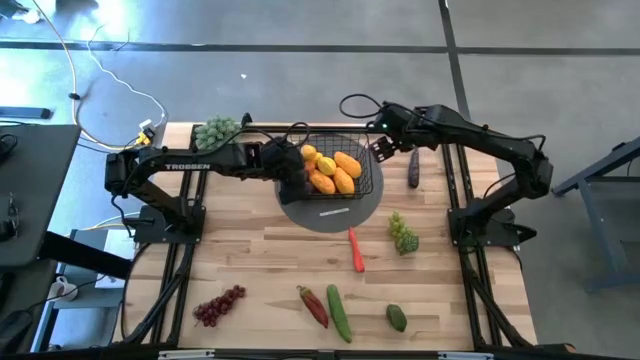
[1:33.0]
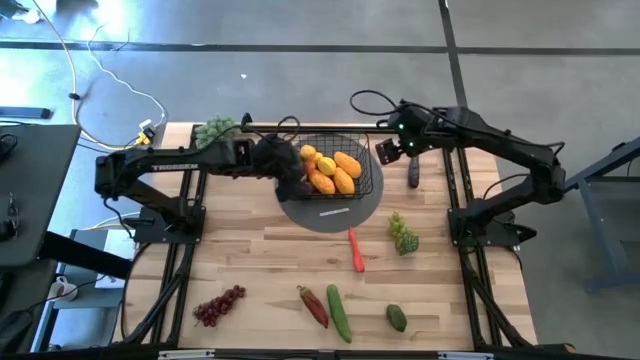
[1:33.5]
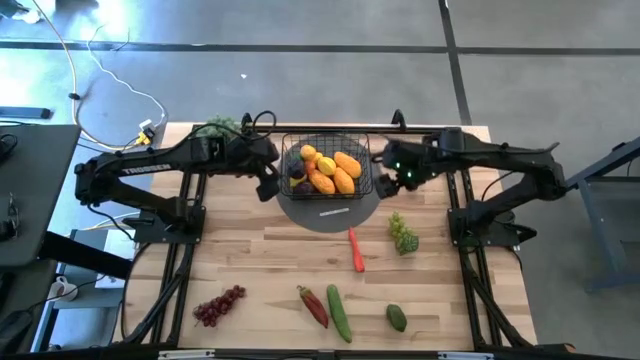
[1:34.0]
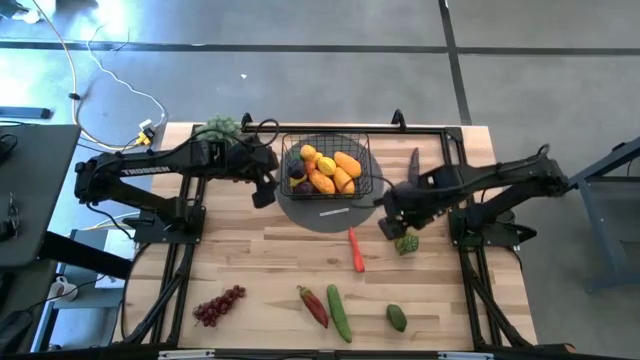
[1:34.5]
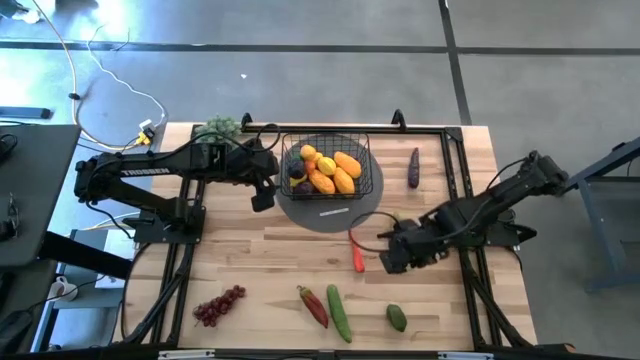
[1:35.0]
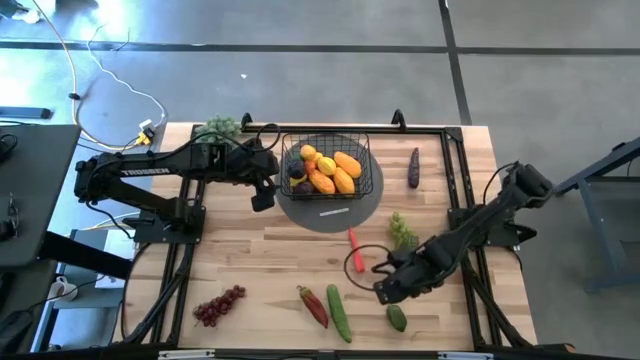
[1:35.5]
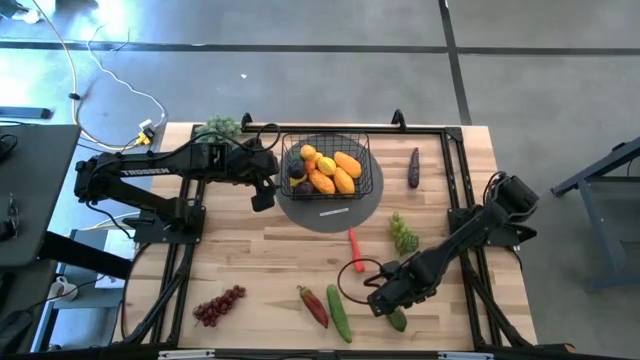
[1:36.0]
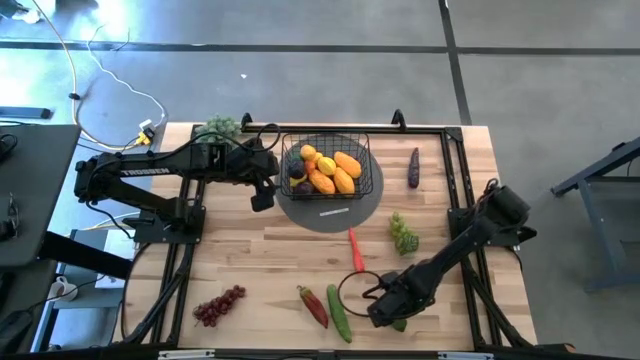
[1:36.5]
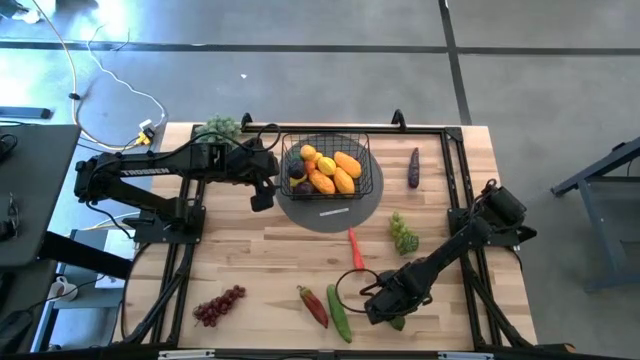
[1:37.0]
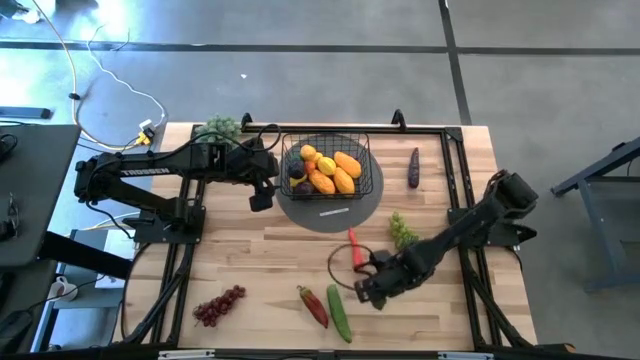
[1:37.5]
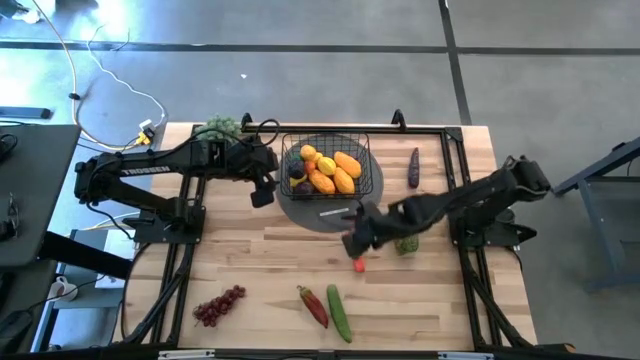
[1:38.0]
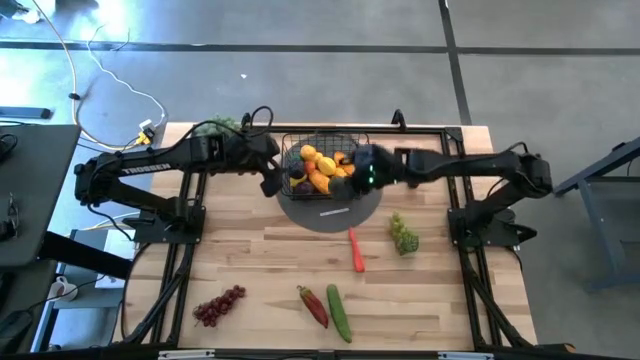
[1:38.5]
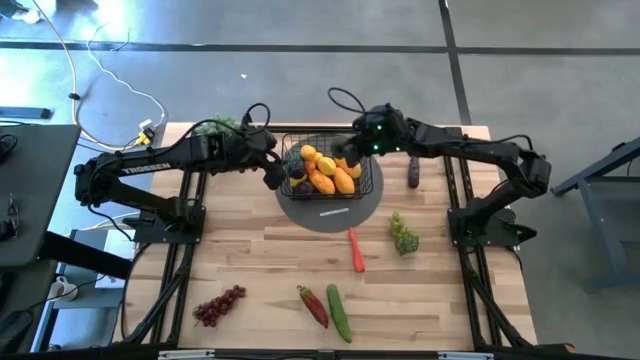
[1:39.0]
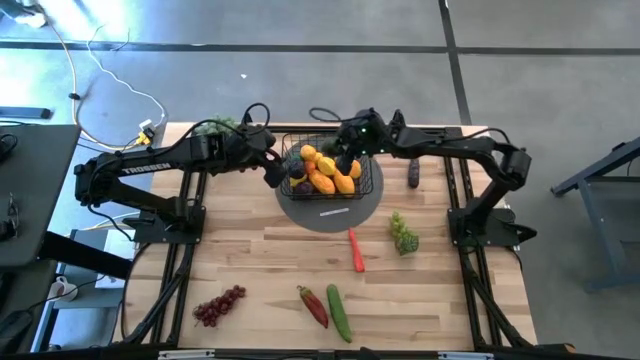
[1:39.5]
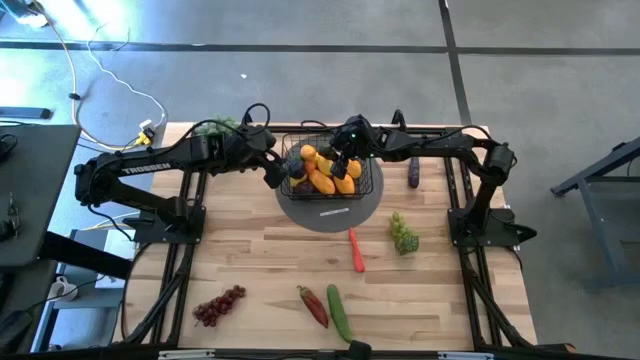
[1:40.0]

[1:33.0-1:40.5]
Task: Build produce basket
Put the lime into the black wire basket

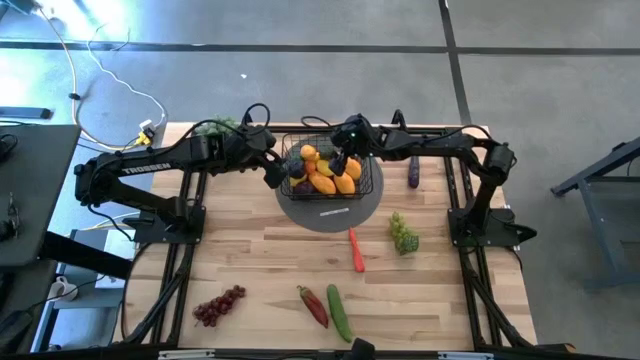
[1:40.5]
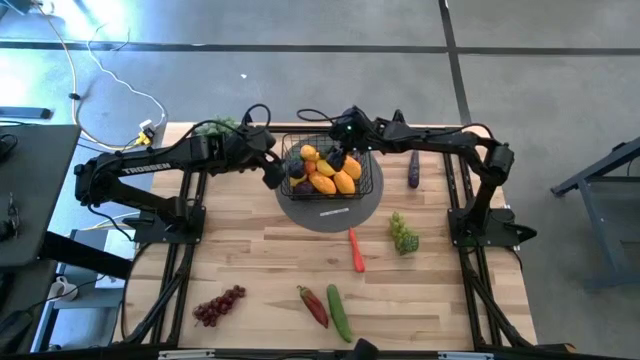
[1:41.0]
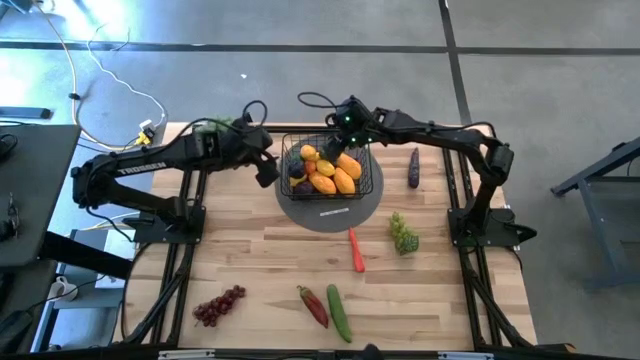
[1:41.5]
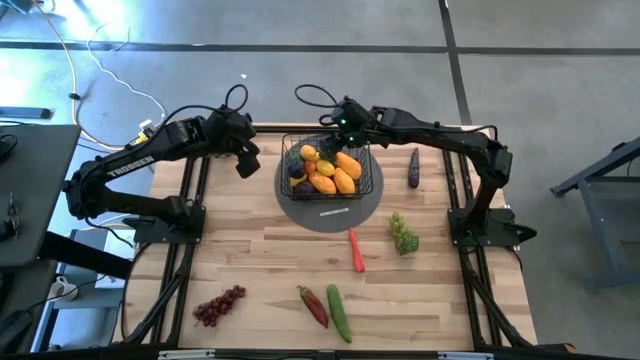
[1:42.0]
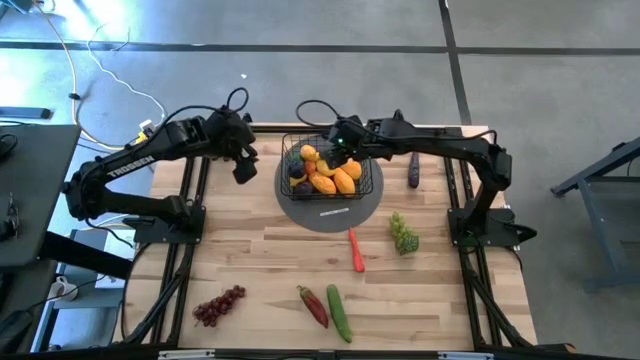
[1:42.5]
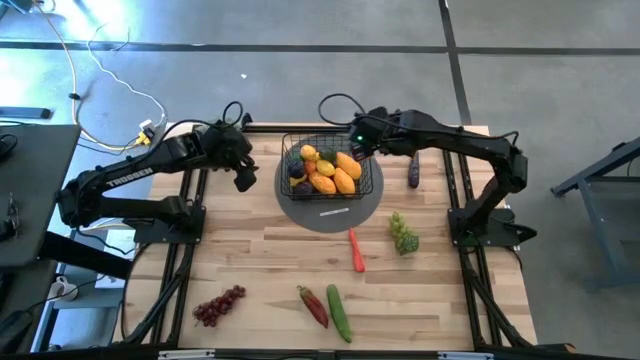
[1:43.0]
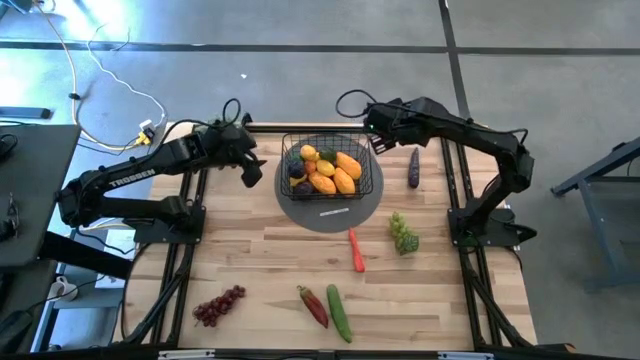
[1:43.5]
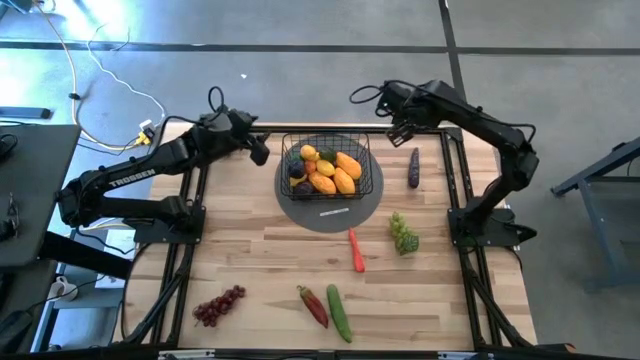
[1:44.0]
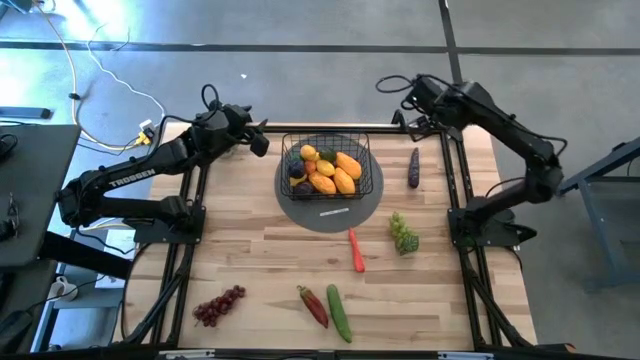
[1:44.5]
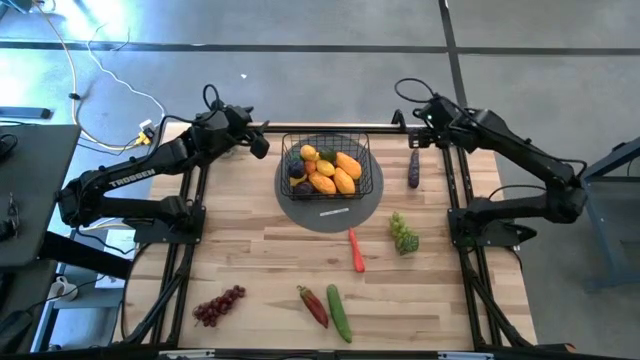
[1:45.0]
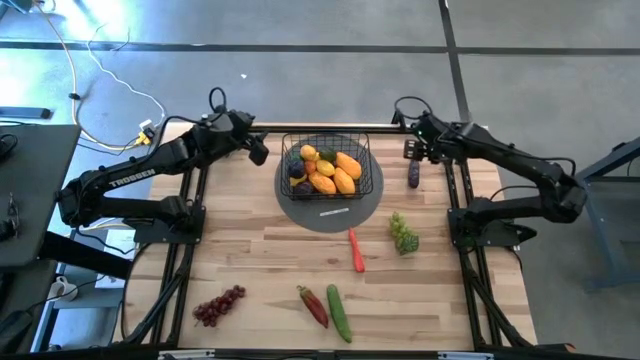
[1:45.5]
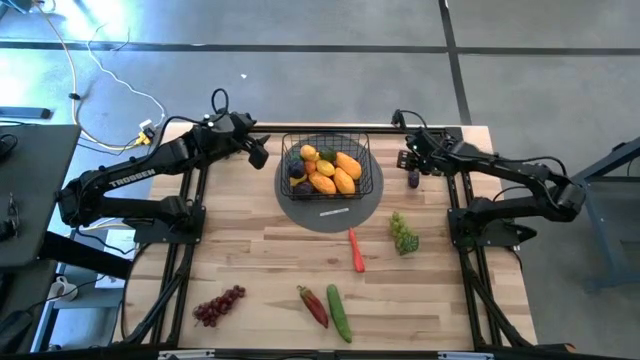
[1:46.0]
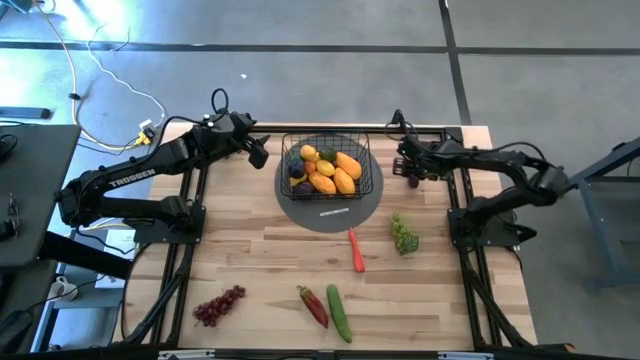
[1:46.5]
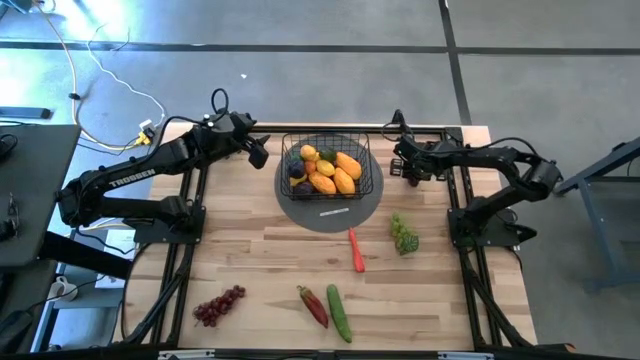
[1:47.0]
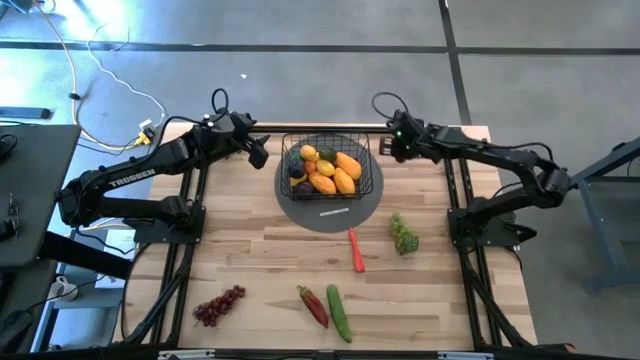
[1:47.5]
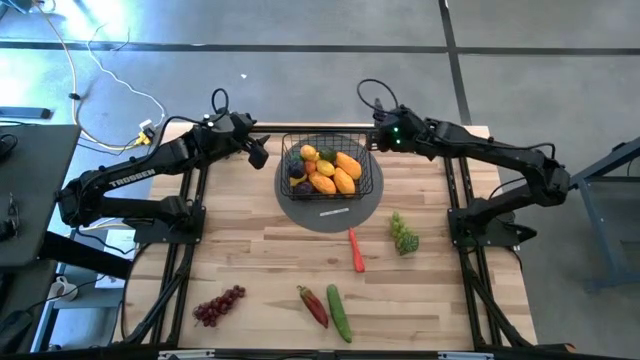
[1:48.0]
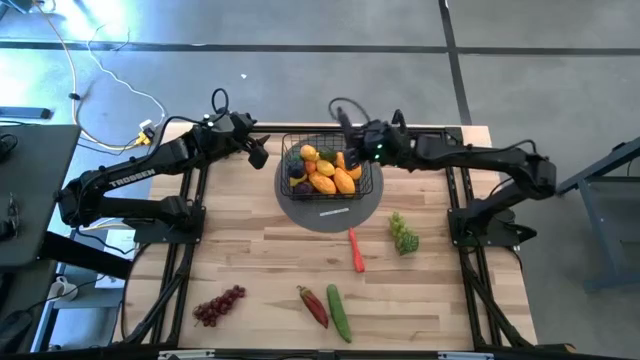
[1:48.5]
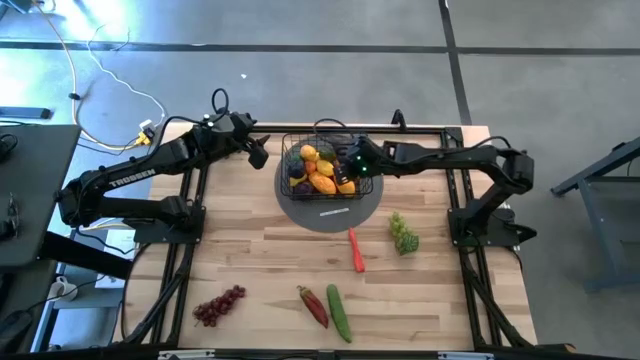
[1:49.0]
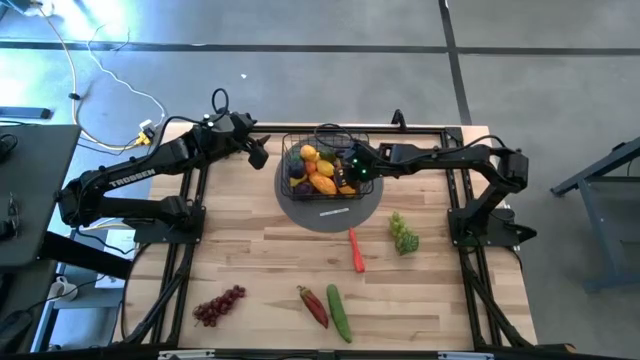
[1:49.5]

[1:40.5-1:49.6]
Put the eggplant into the black wire basket

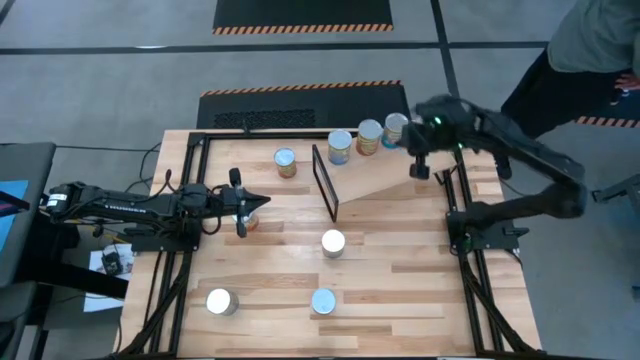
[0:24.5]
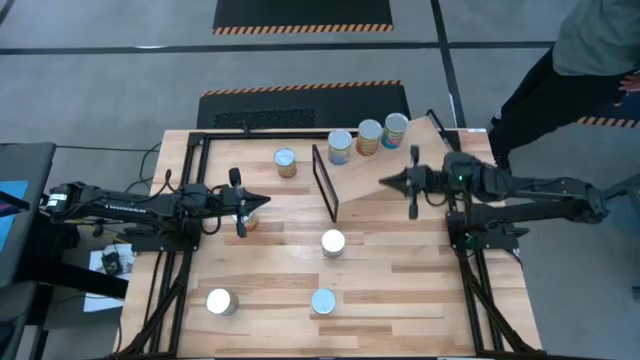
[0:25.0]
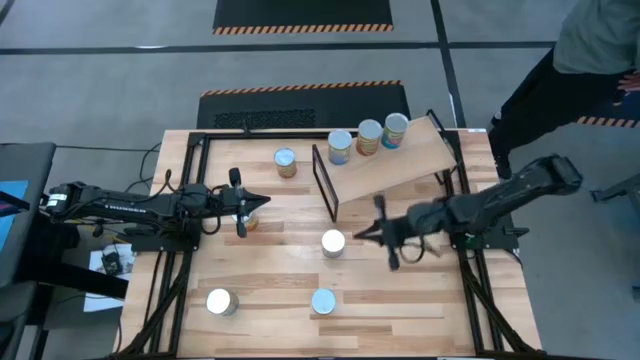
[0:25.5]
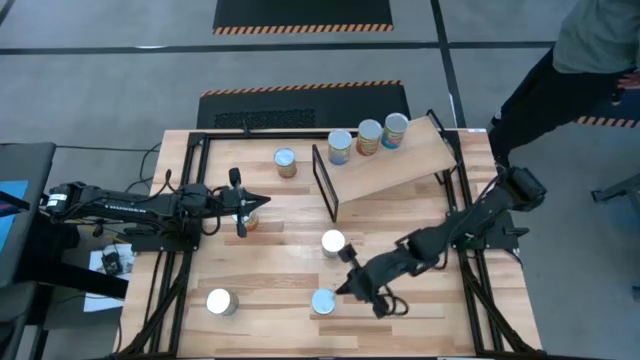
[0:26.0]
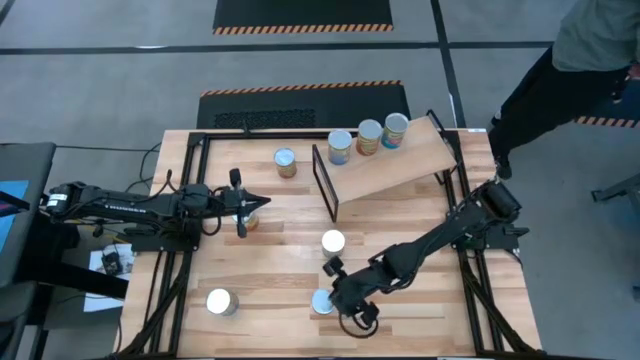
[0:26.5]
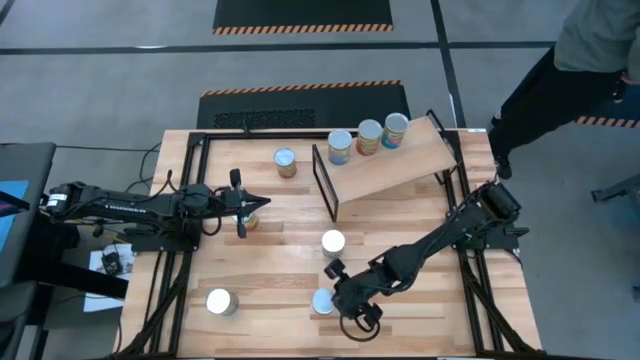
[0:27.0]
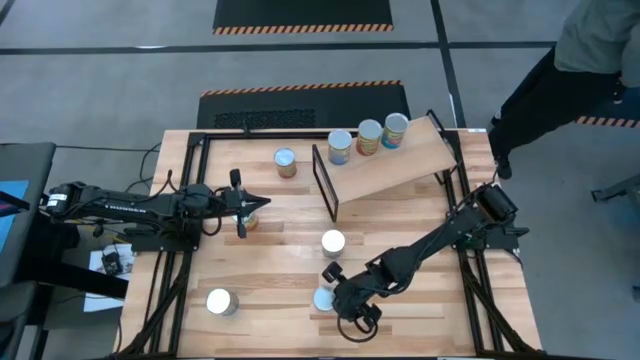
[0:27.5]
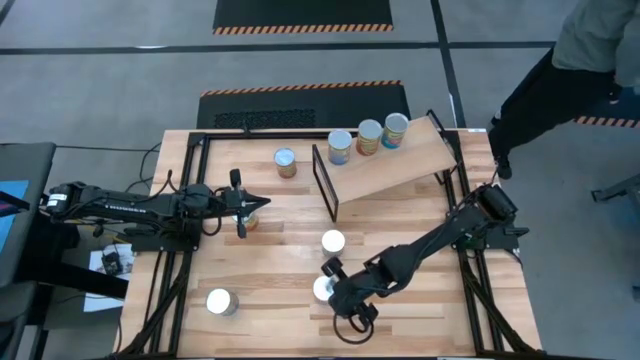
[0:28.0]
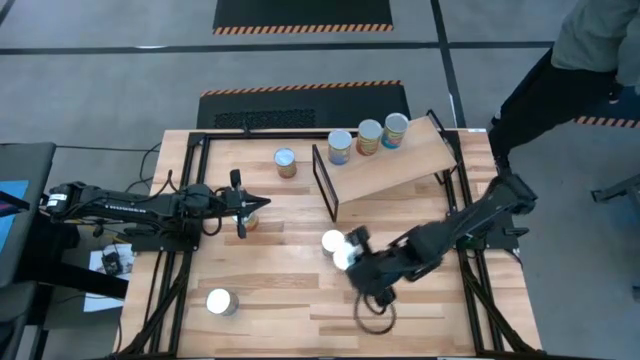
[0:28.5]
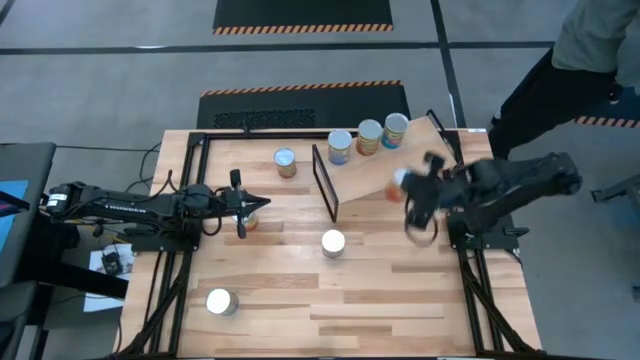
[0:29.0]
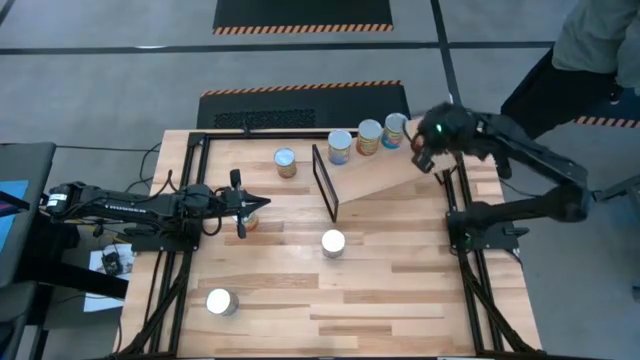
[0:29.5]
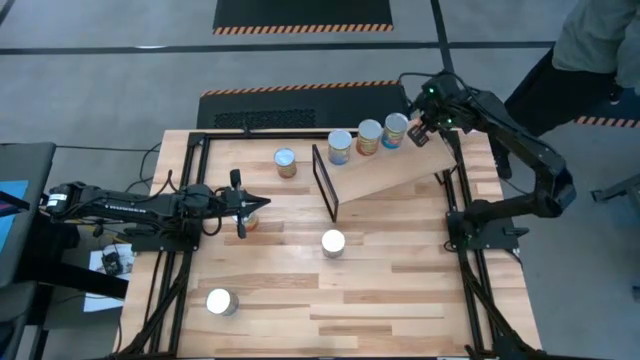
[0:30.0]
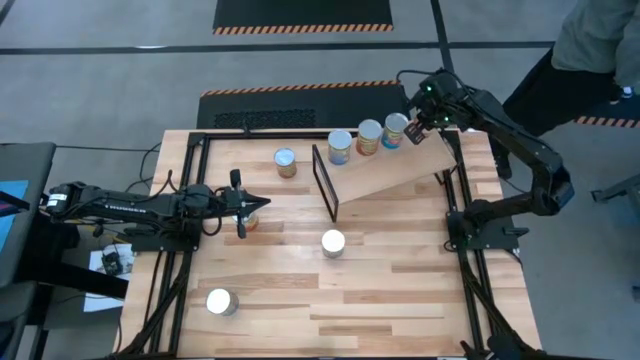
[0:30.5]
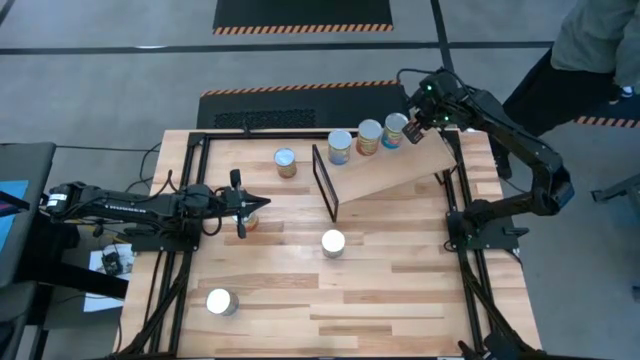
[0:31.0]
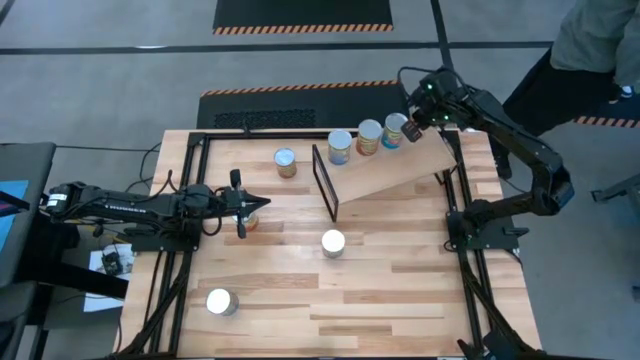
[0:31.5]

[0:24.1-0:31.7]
Task: Pick and place cans onto a shelf
Put the right canned corn on the shelf
